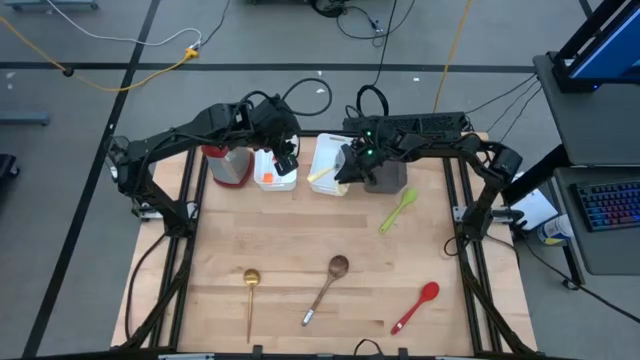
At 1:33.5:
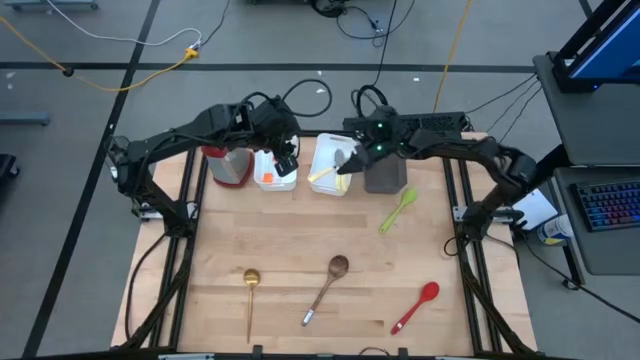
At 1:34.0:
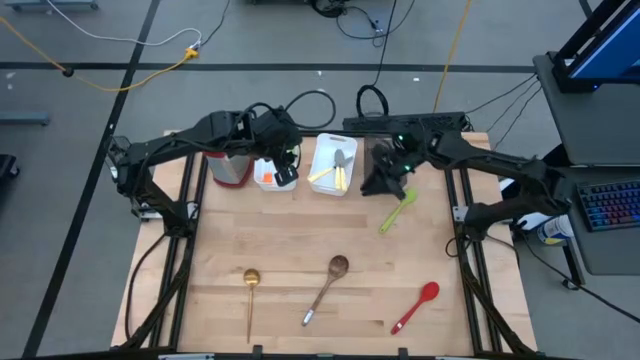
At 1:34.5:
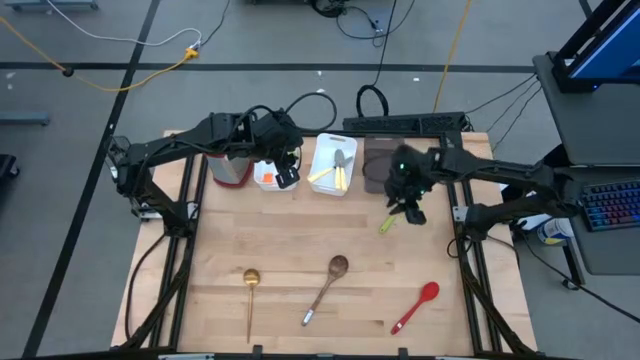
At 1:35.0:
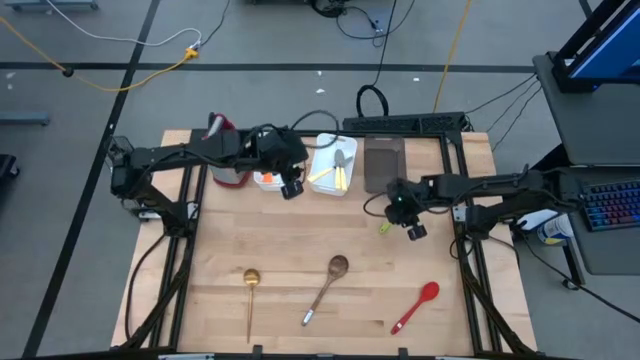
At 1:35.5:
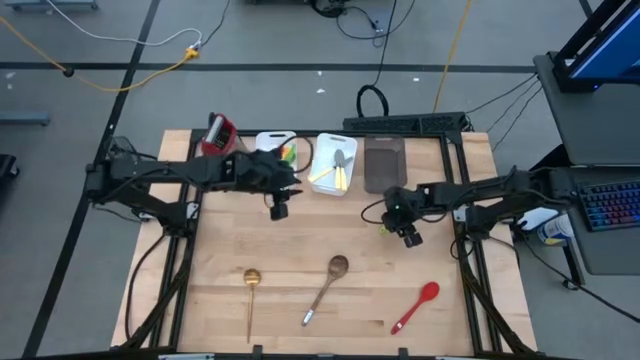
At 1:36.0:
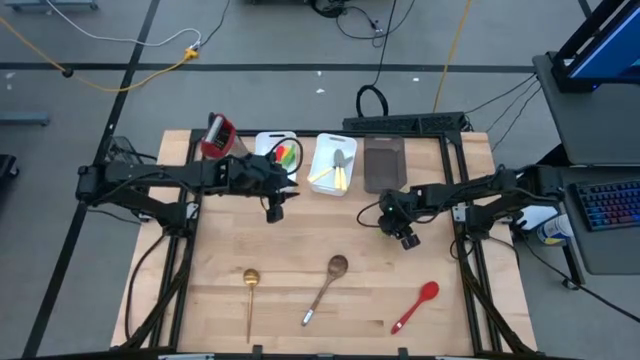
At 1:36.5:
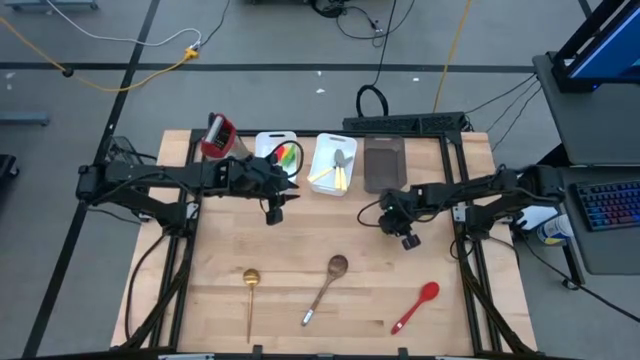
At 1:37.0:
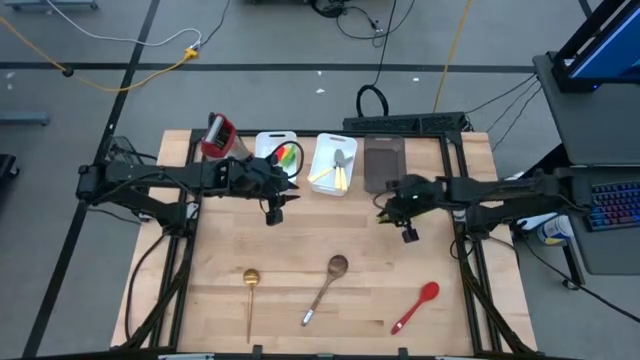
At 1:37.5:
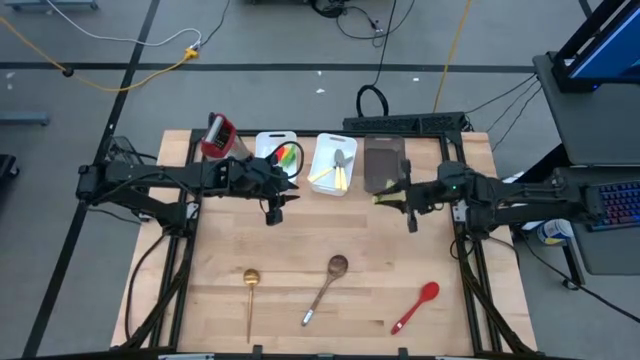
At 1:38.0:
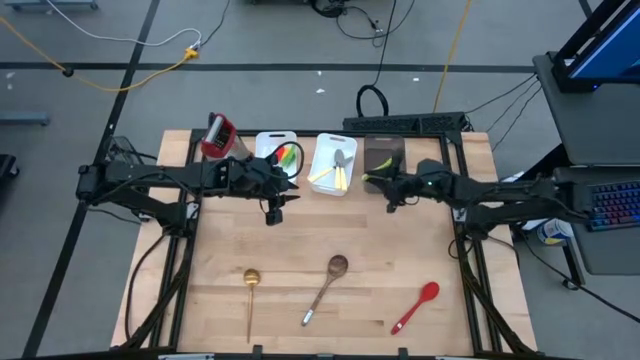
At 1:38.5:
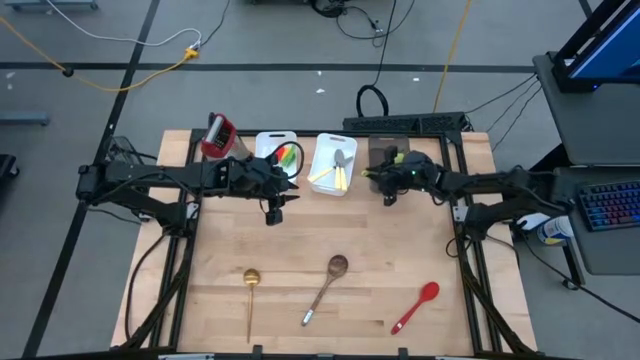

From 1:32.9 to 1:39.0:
Task: Pick & Place Kitchen Items
Put the green serving spoon into the black bin

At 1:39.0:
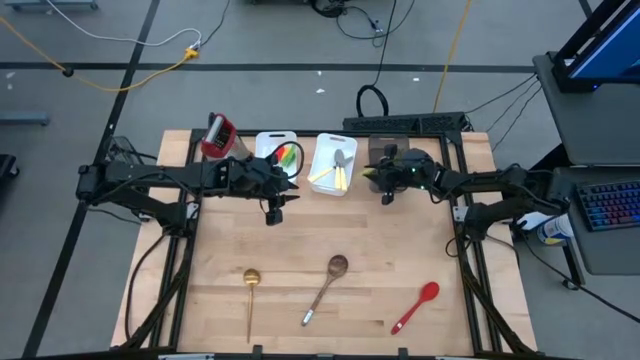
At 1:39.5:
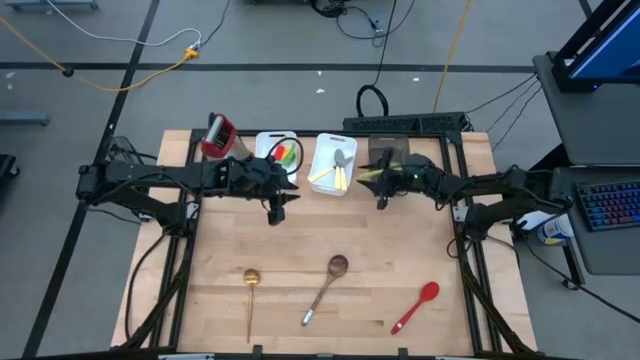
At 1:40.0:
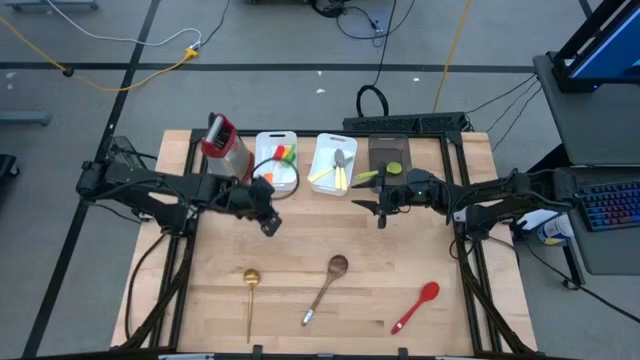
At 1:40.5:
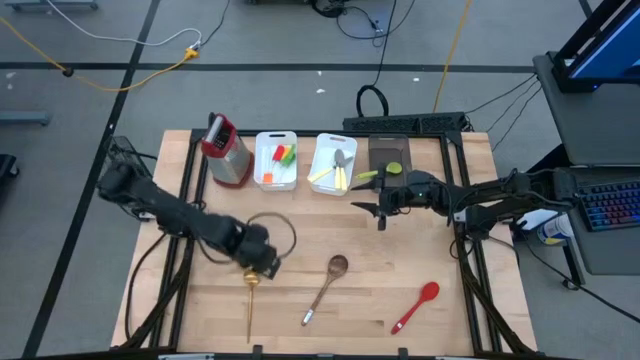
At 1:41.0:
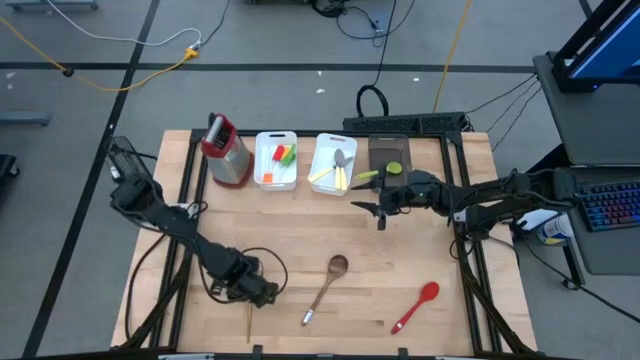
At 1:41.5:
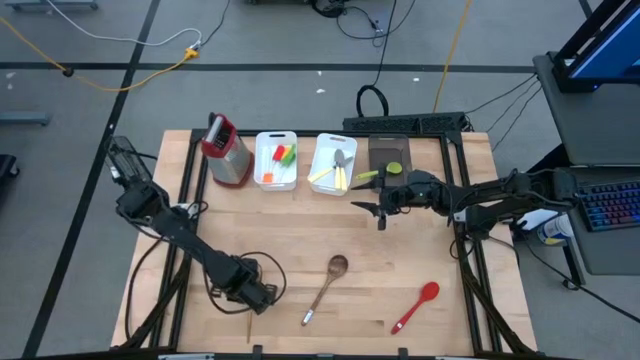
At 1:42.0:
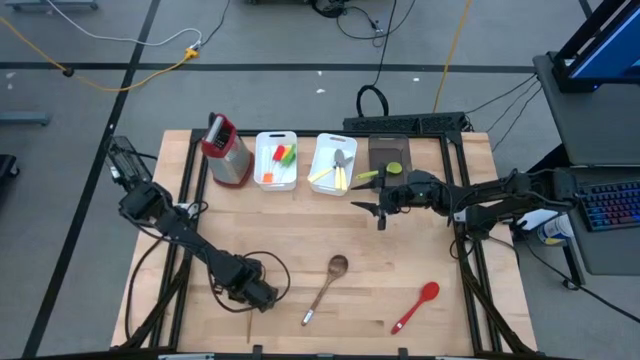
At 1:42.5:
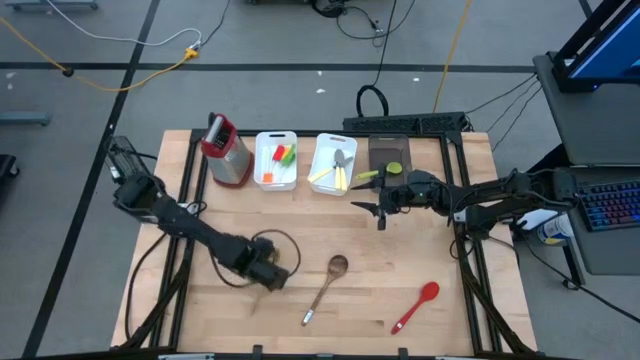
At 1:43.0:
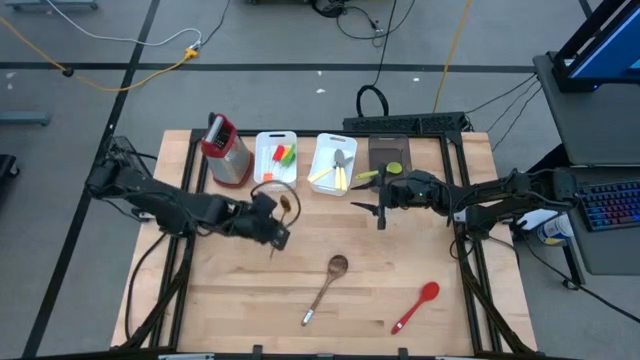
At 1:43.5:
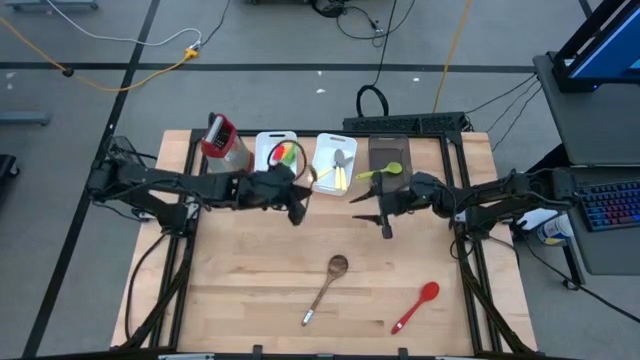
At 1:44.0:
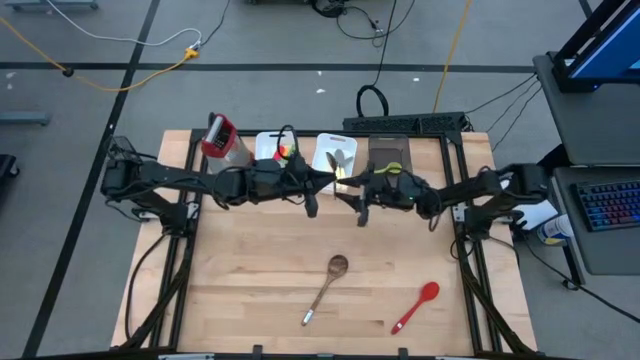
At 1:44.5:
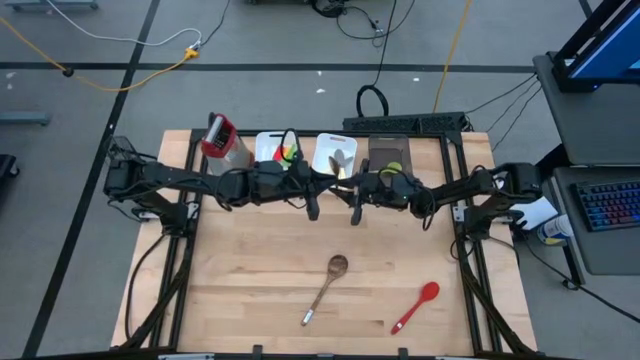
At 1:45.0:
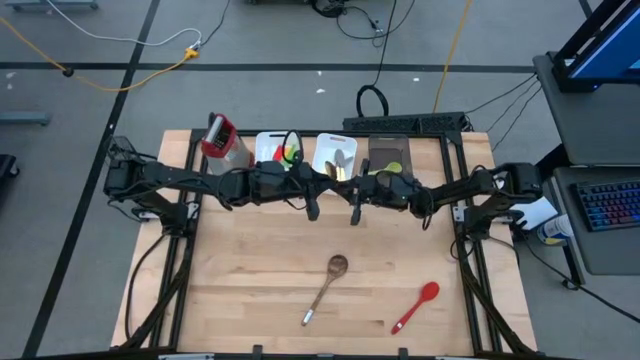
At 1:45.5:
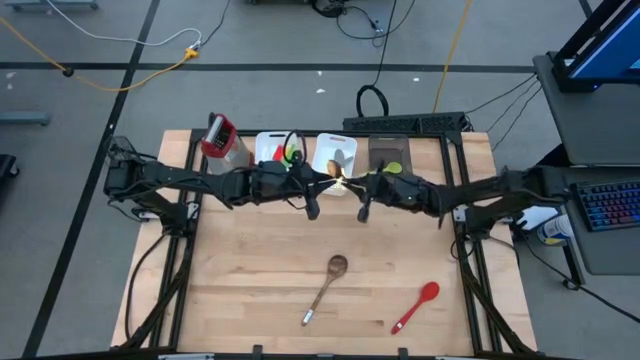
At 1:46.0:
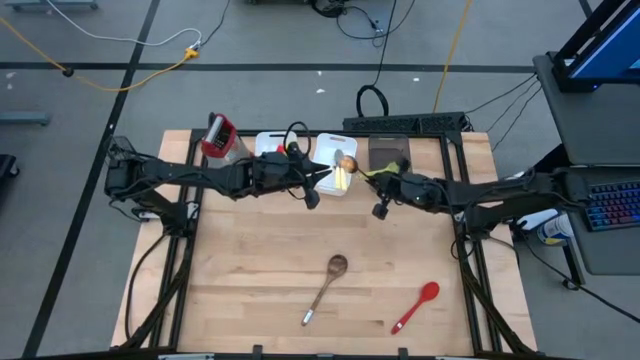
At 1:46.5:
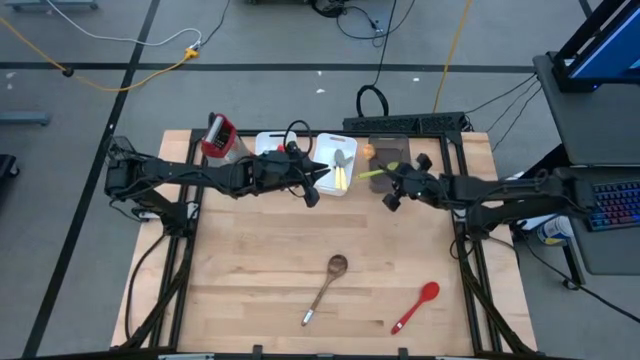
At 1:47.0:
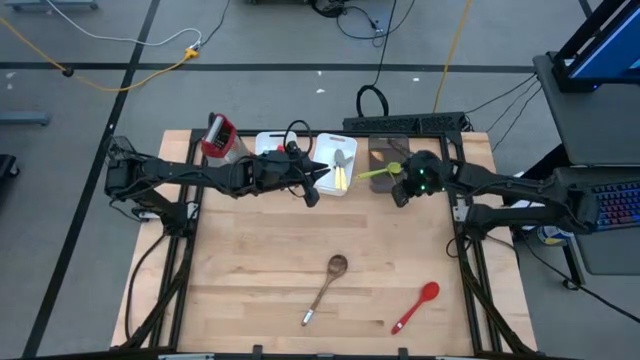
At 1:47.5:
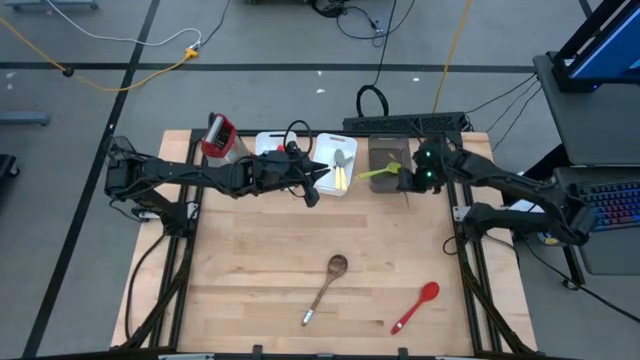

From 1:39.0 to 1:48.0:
Put the gold serving spoon into the black bin

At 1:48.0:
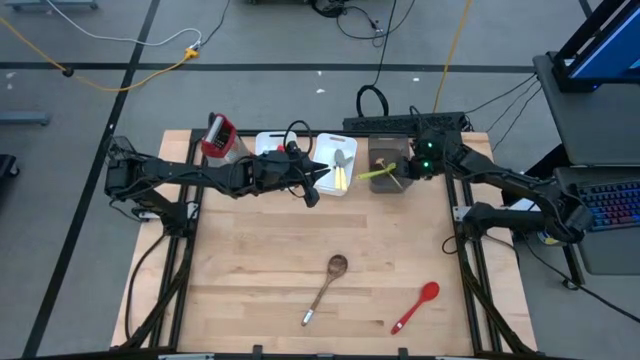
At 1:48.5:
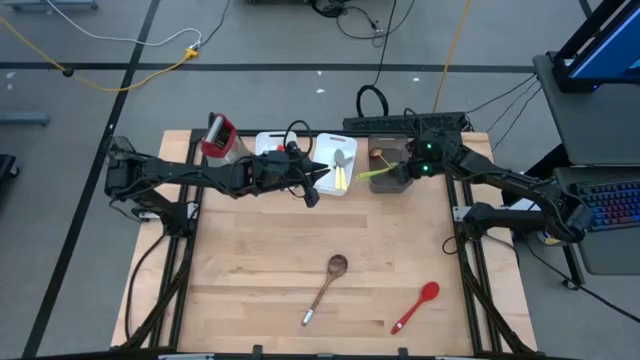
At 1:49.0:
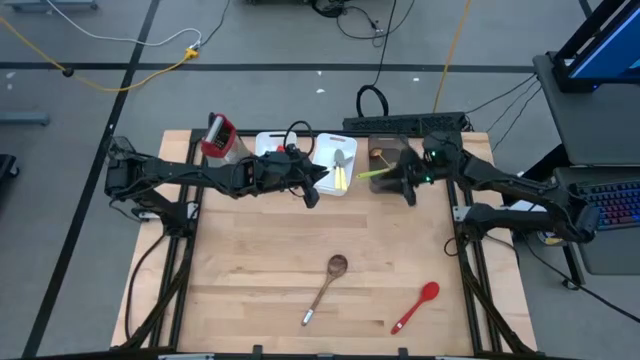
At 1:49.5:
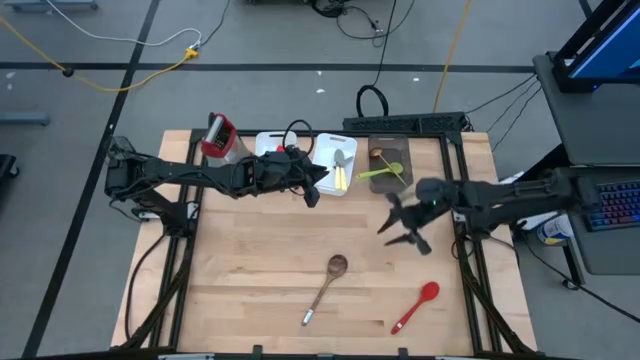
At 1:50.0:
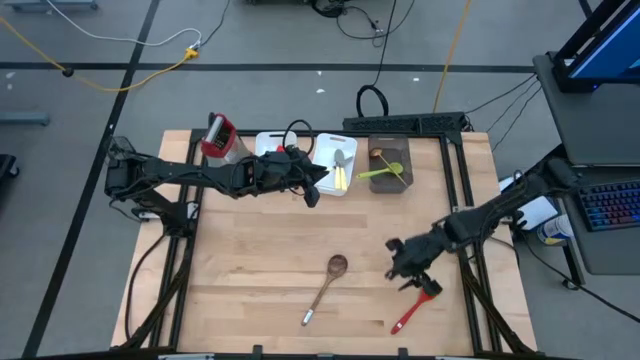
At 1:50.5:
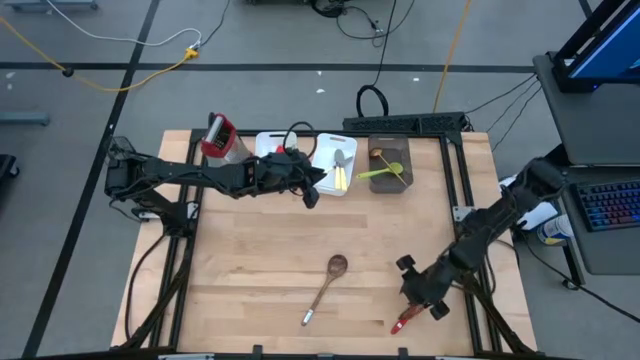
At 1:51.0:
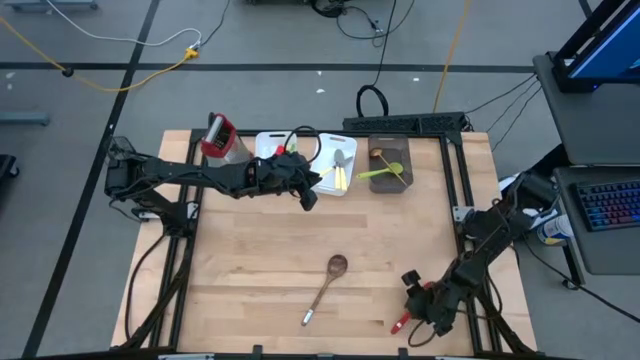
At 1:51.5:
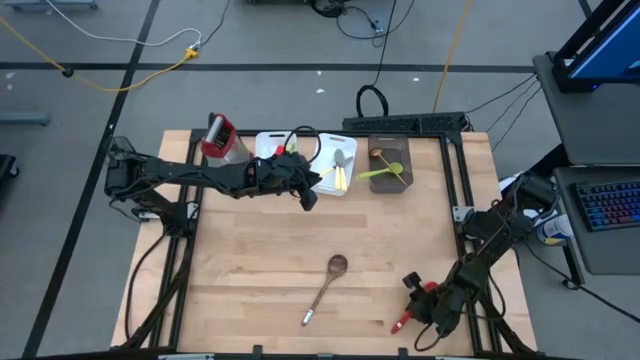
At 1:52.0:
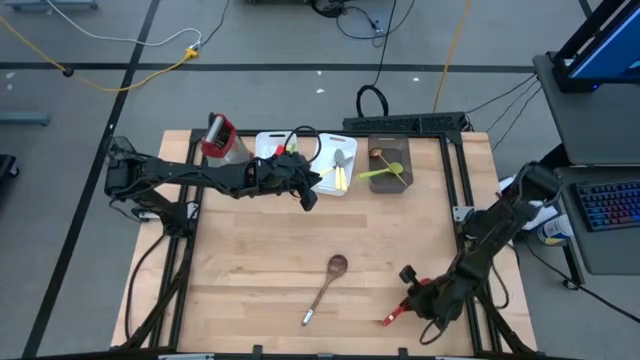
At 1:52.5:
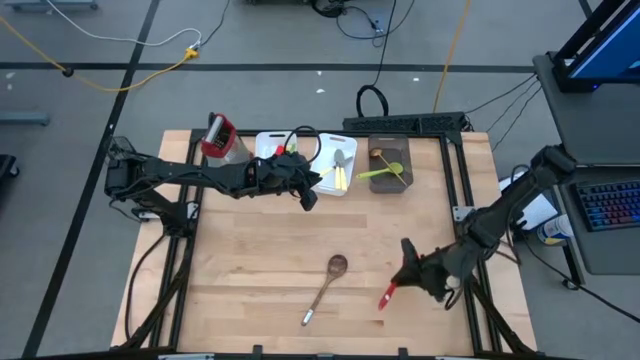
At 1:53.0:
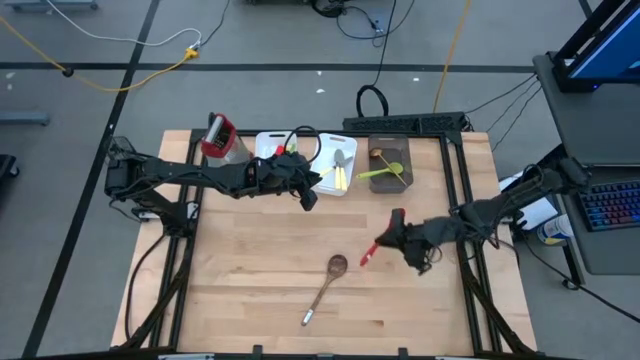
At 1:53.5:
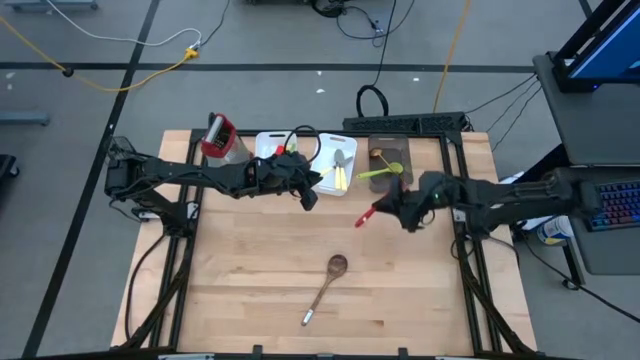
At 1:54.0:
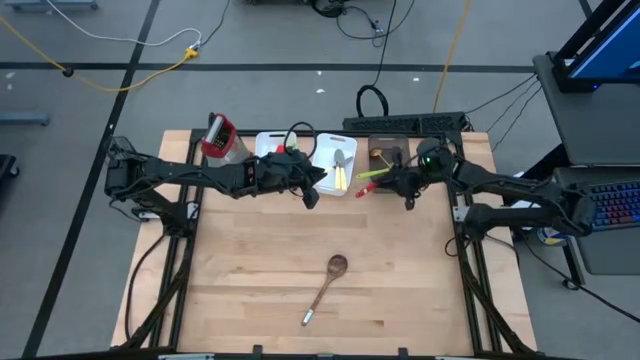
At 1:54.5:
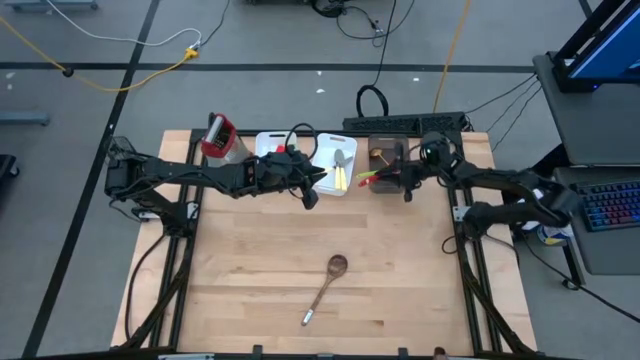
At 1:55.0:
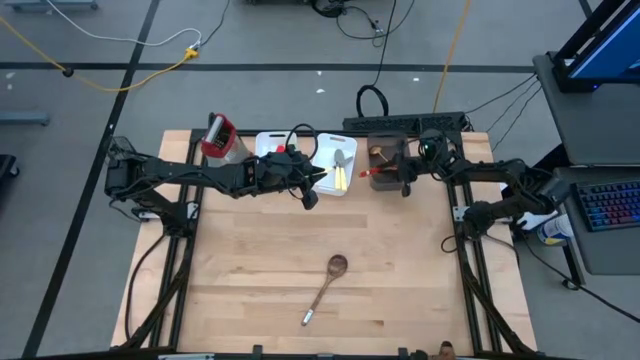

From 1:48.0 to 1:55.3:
Put the red serving spoon into the black bin
